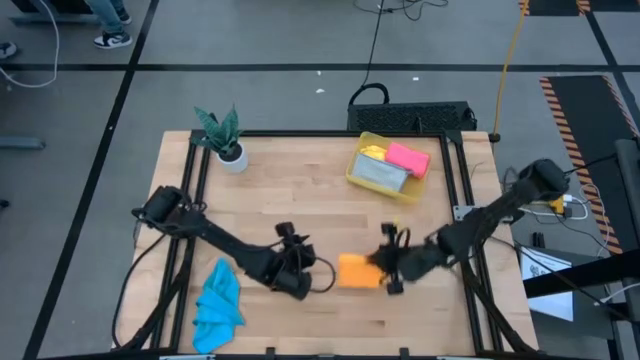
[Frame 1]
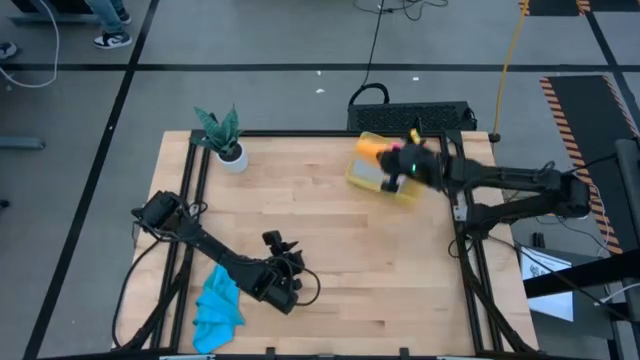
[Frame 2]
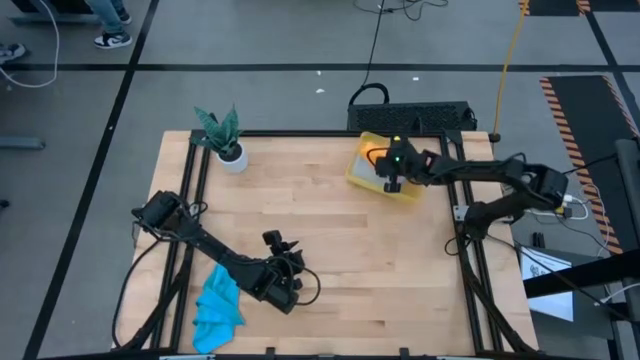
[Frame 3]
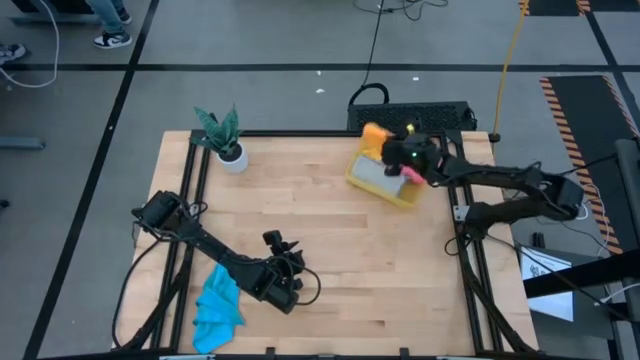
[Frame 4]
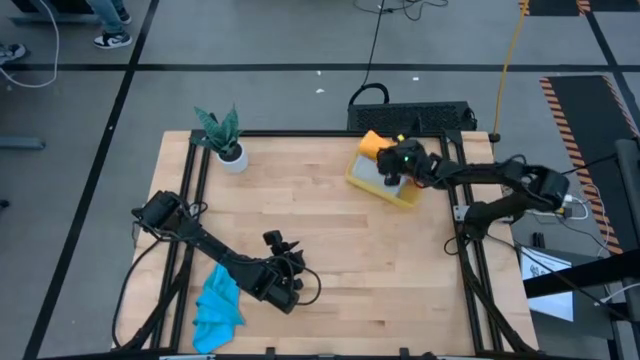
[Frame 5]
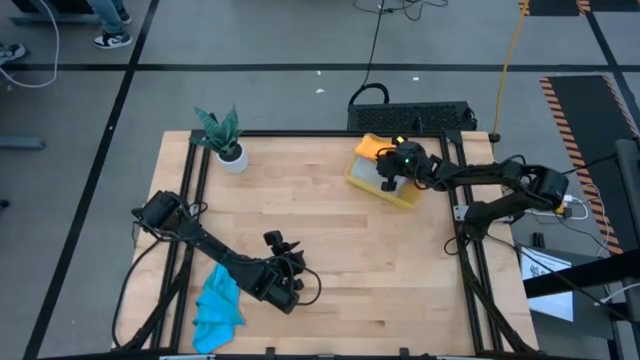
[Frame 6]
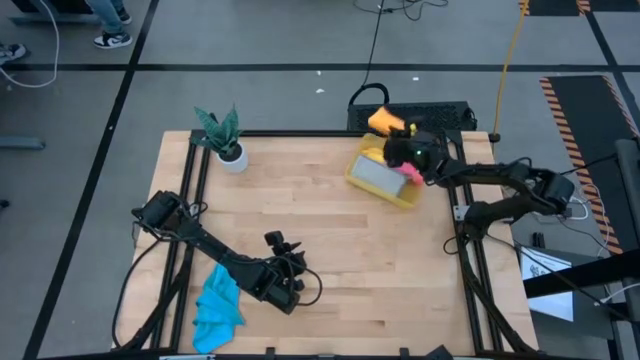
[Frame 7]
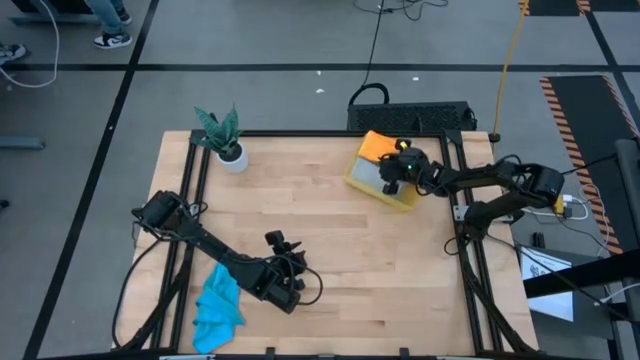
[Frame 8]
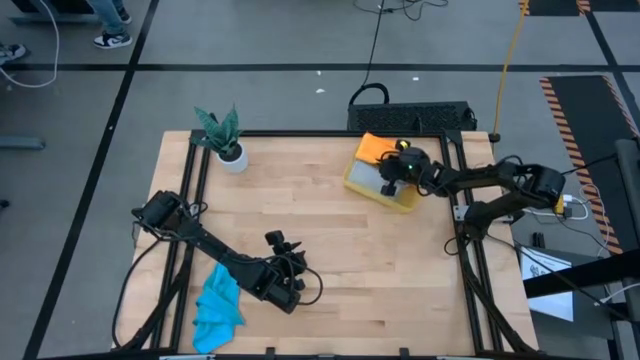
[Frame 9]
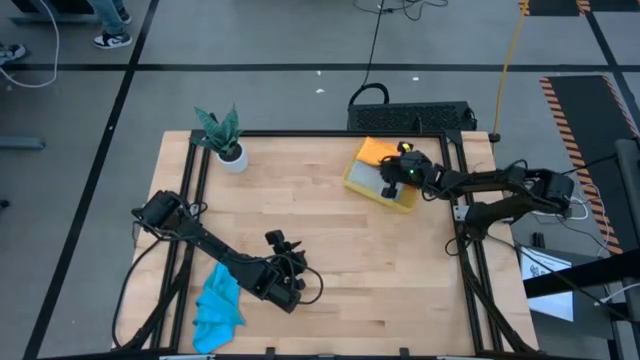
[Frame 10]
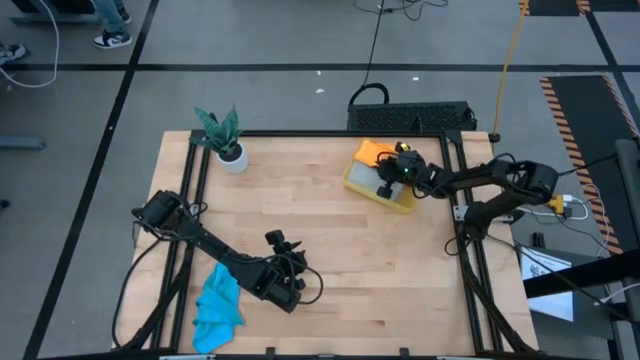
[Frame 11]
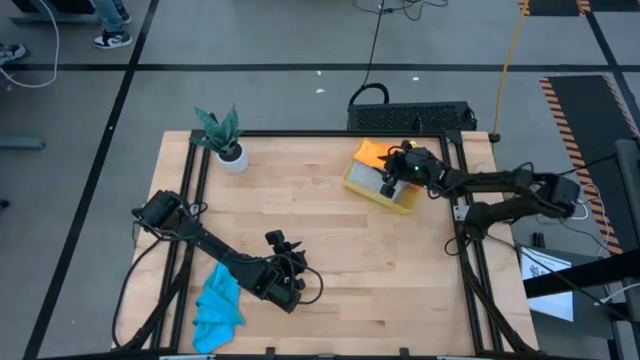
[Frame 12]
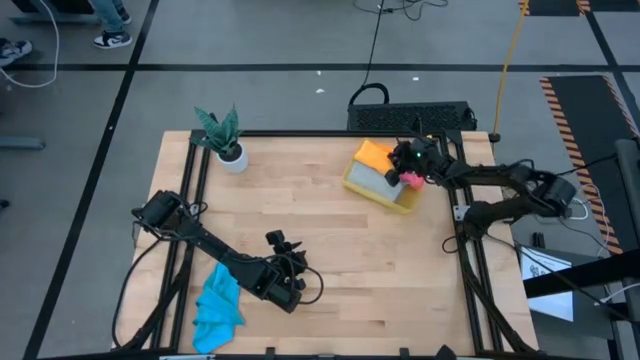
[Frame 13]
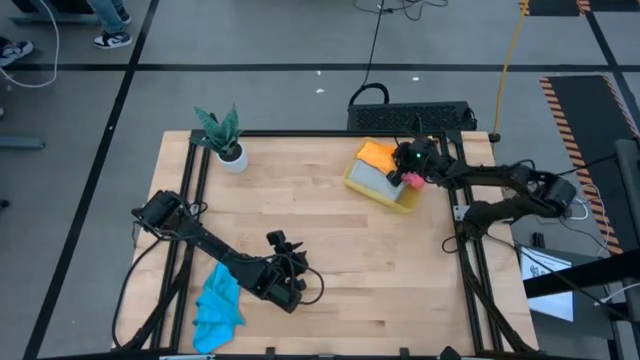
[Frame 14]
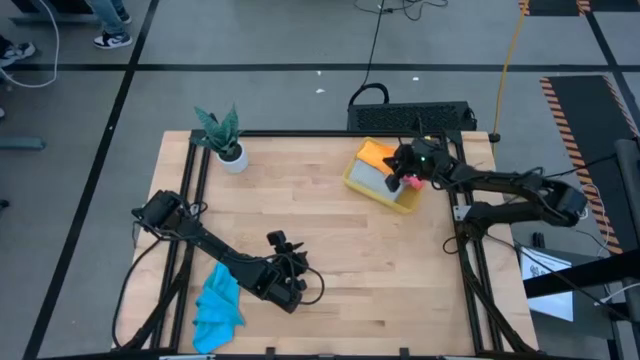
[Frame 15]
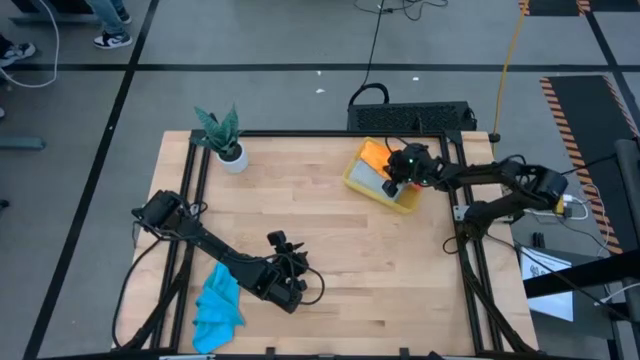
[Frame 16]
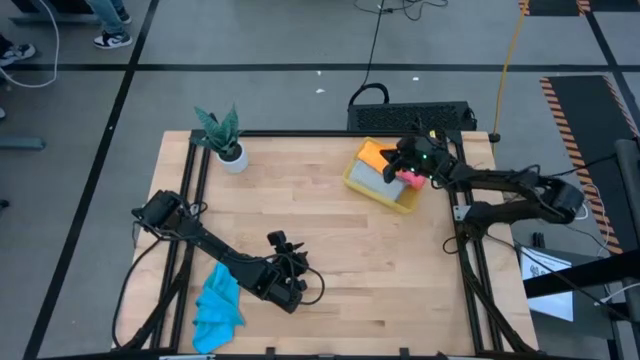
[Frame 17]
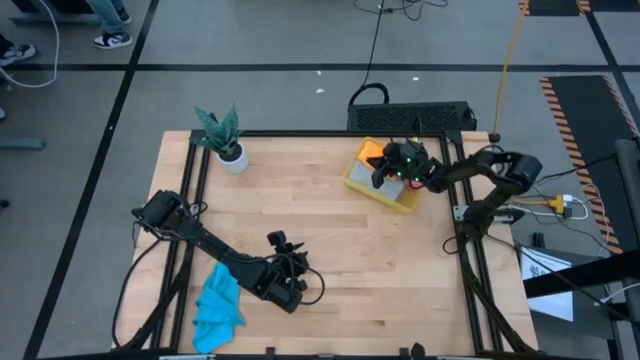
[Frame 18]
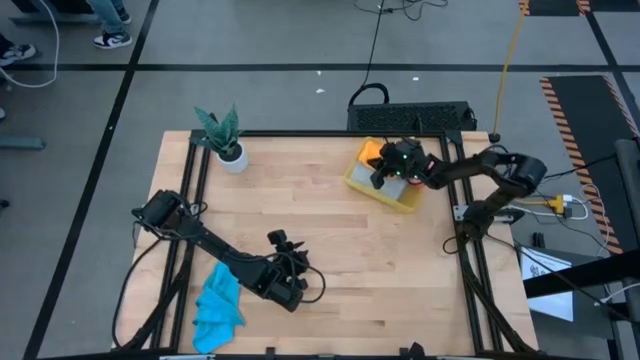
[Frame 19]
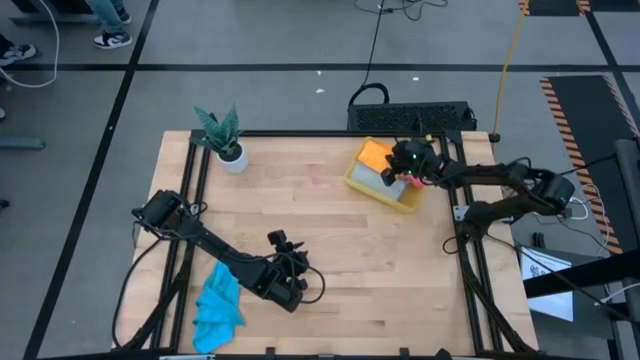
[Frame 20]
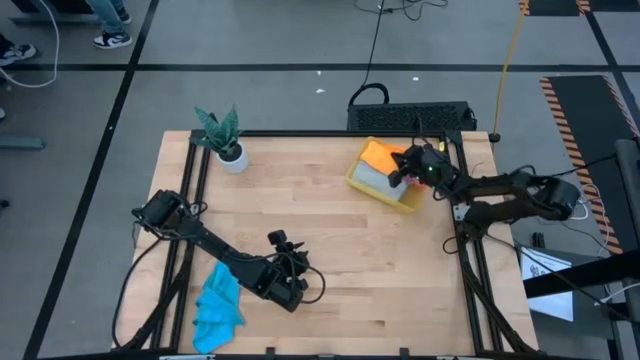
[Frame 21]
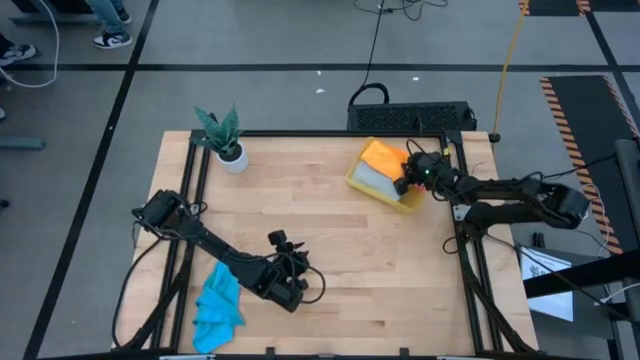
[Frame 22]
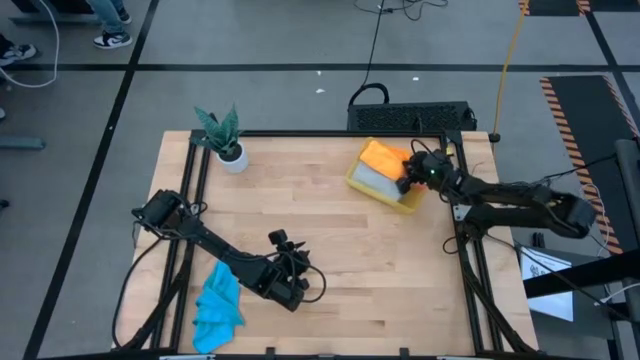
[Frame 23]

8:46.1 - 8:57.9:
Task: Fold microfiber towels
Put the orange kitchen towel into the yellow bin

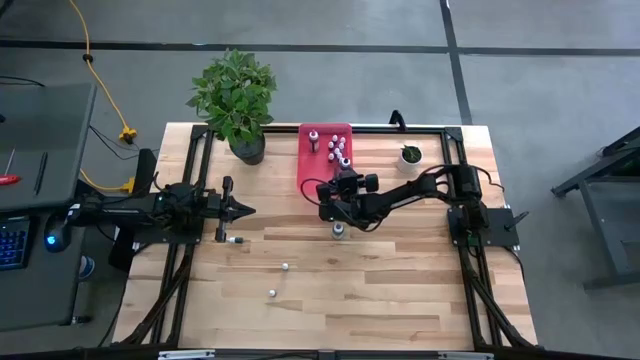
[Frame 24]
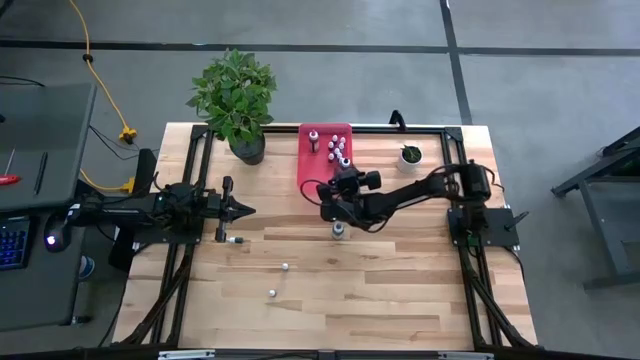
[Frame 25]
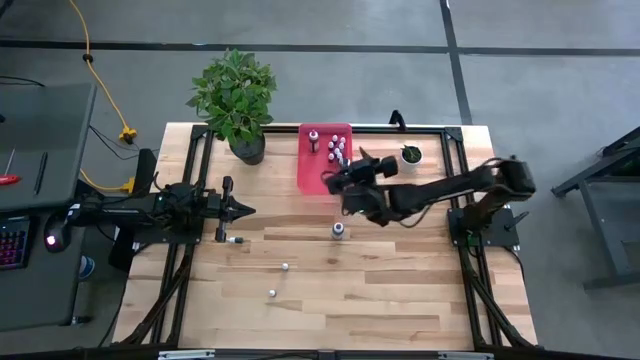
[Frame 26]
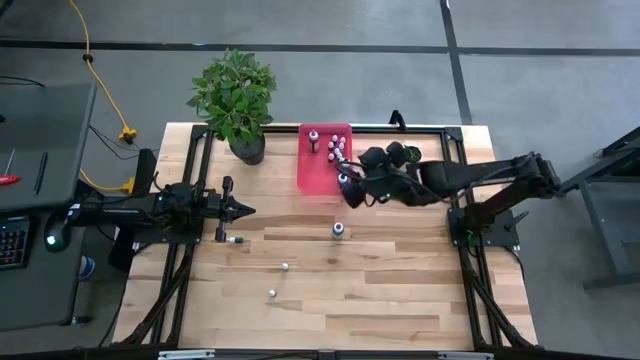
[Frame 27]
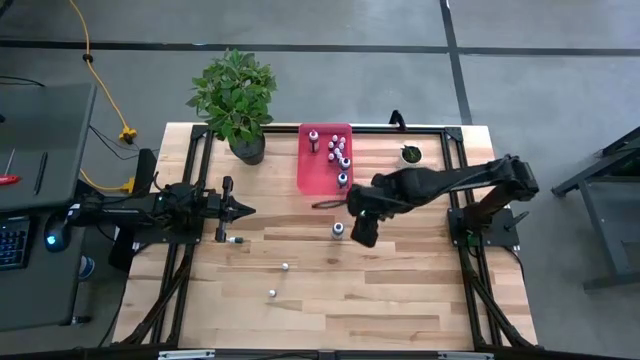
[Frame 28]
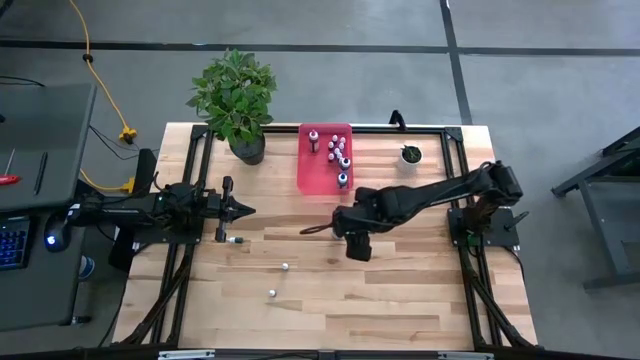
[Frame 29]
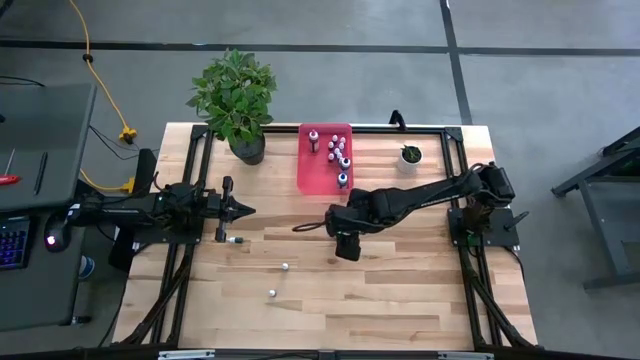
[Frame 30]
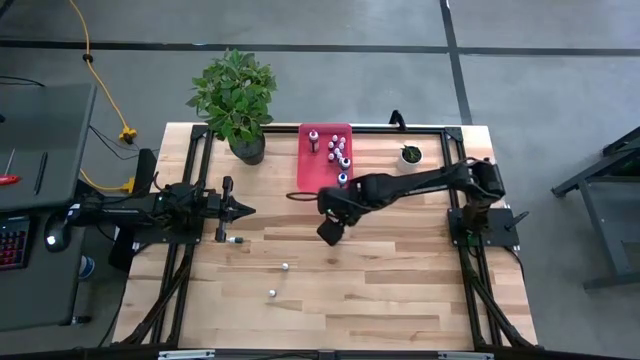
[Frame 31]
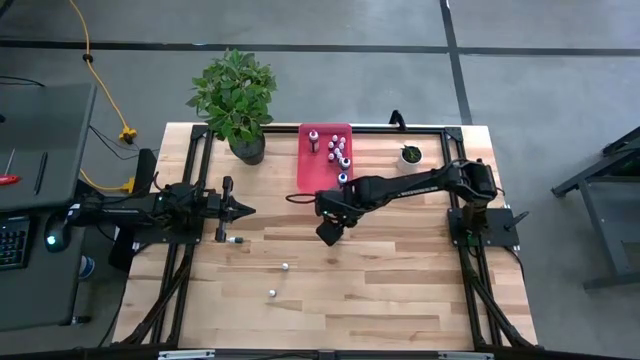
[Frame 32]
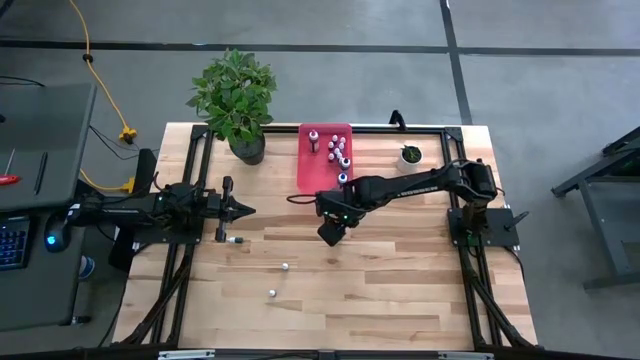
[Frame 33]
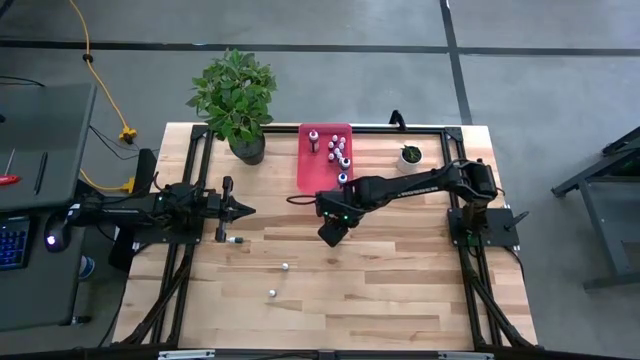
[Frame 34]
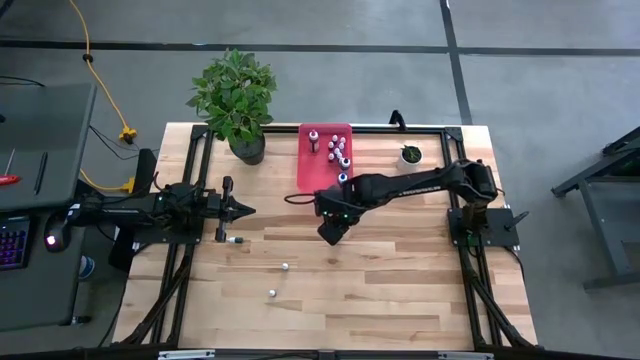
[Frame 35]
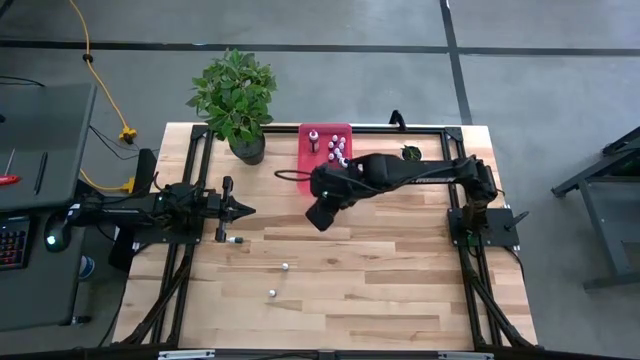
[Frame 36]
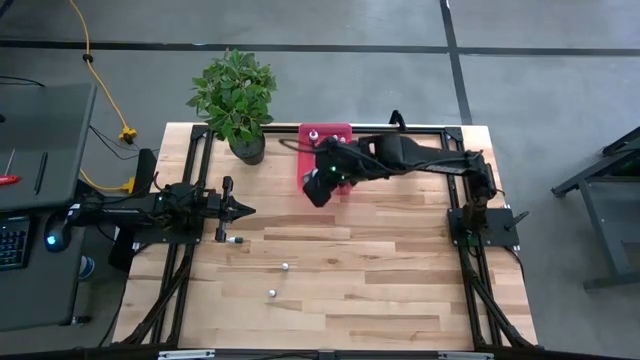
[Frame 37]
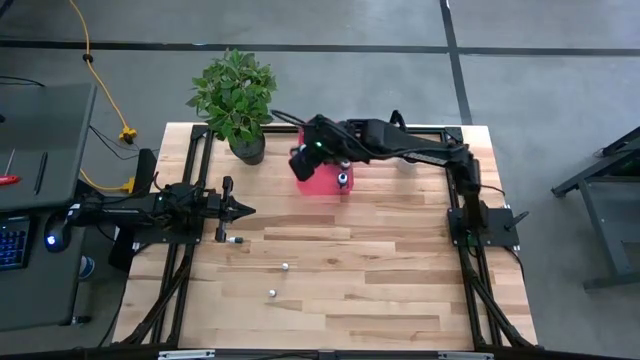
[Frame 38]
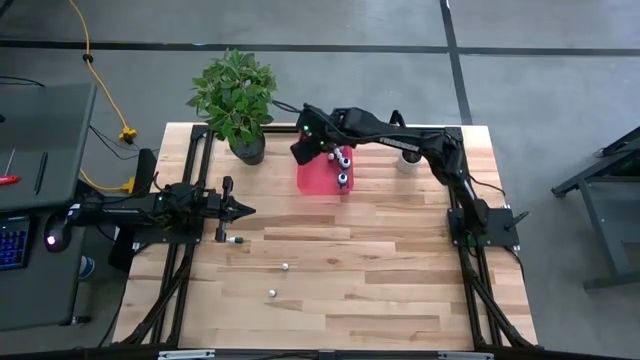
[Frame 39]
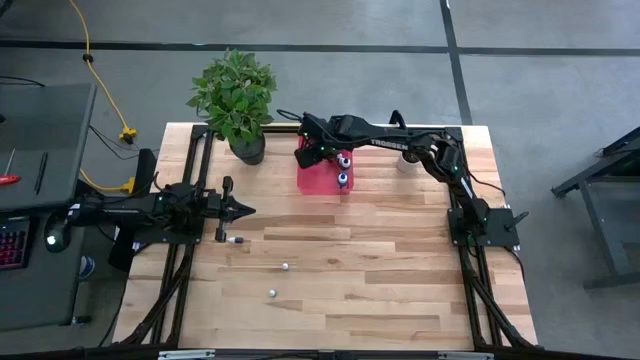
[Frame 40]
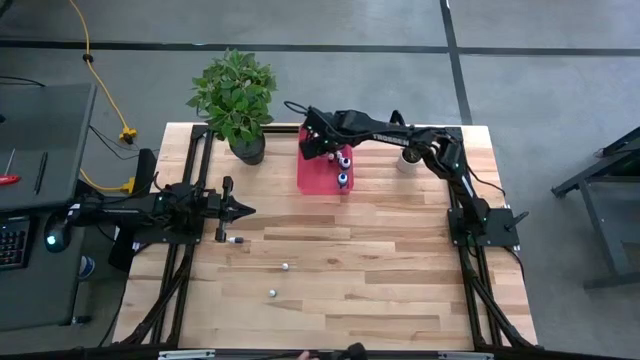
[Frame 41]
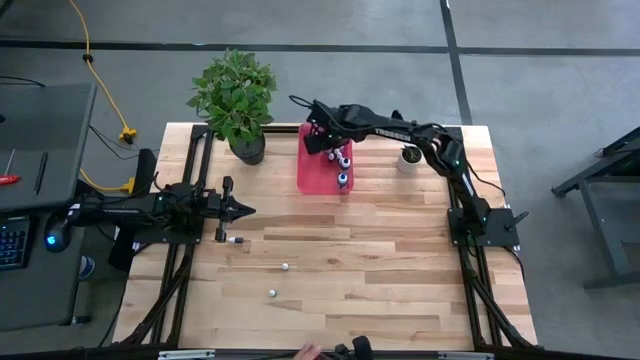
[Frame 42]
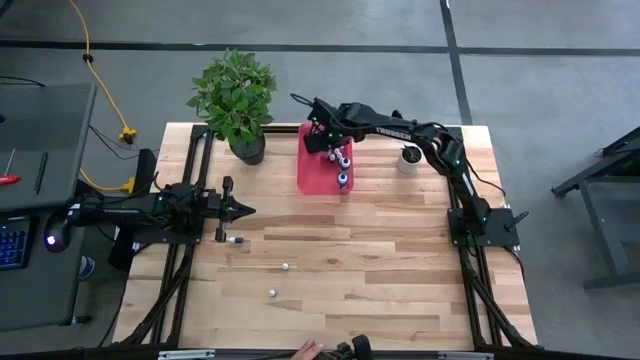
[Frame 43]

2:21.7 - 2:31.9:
Task: Pick & Place food coloring
Put the purple food coloring bottle into the pink bin
